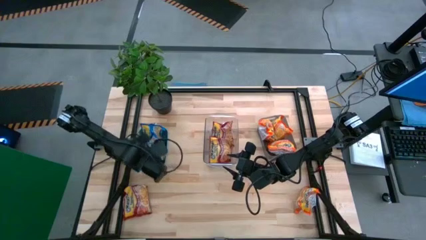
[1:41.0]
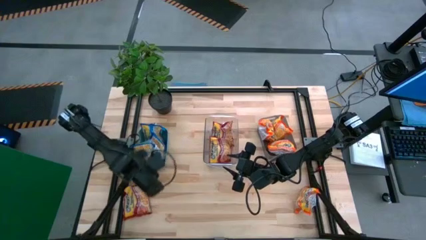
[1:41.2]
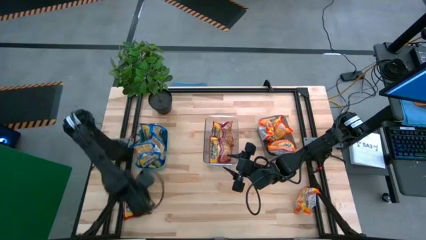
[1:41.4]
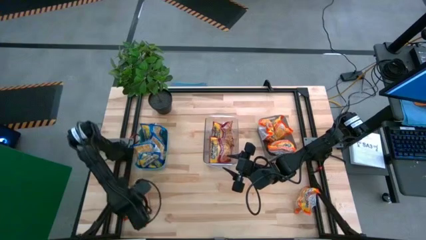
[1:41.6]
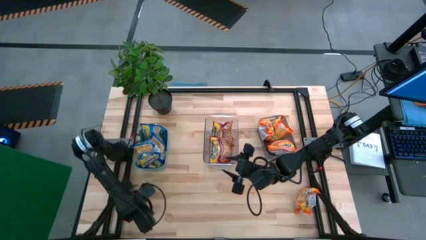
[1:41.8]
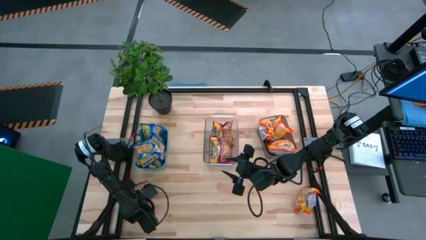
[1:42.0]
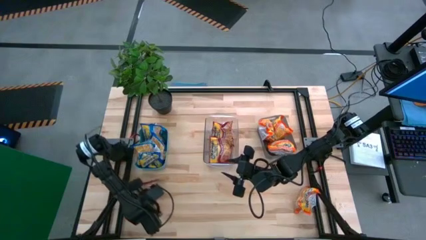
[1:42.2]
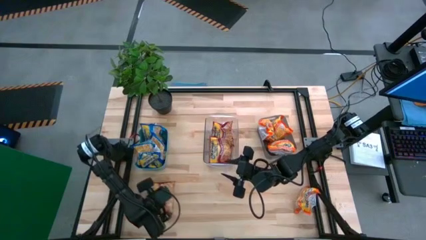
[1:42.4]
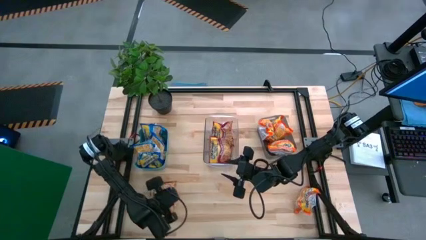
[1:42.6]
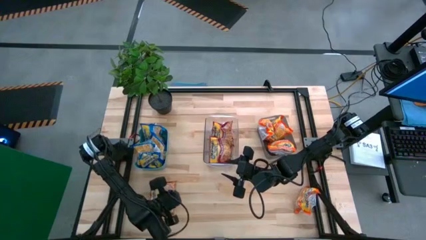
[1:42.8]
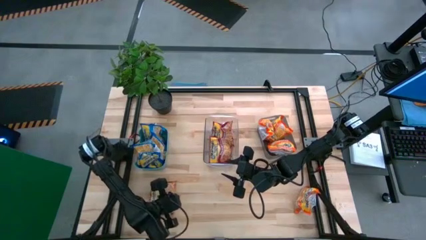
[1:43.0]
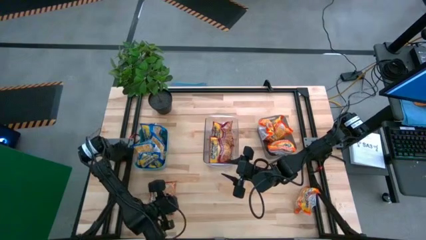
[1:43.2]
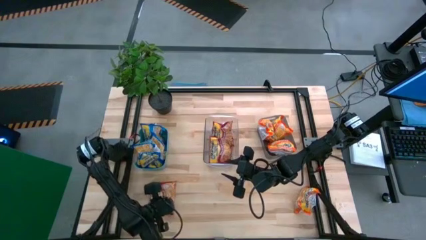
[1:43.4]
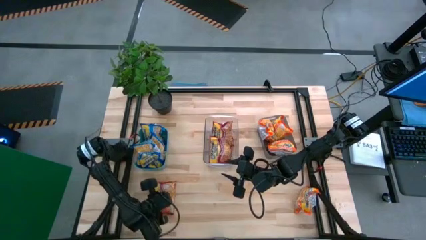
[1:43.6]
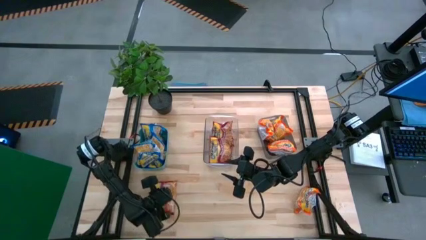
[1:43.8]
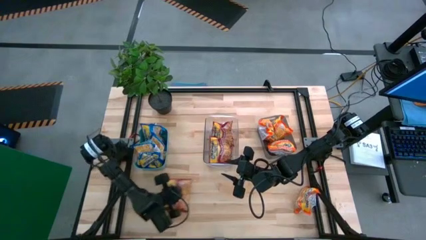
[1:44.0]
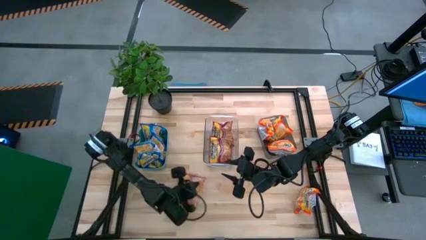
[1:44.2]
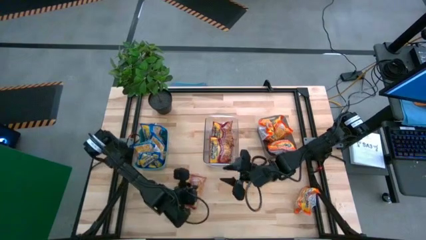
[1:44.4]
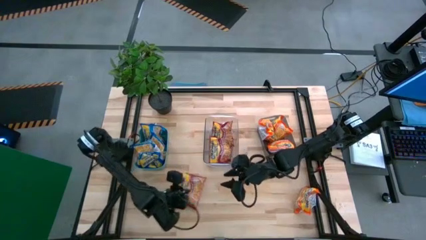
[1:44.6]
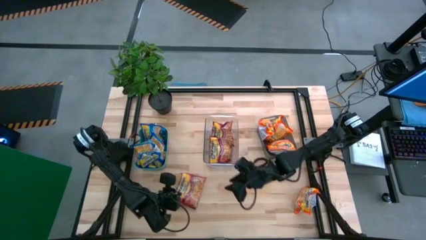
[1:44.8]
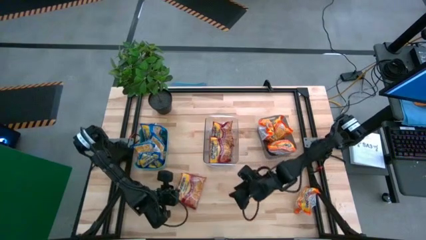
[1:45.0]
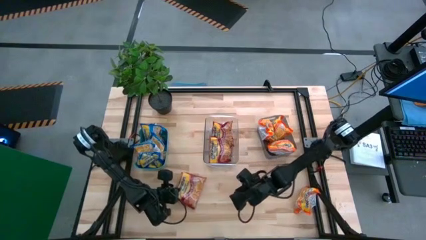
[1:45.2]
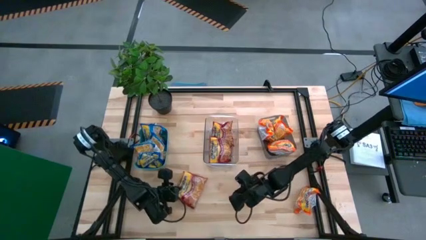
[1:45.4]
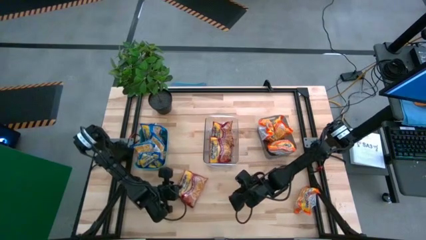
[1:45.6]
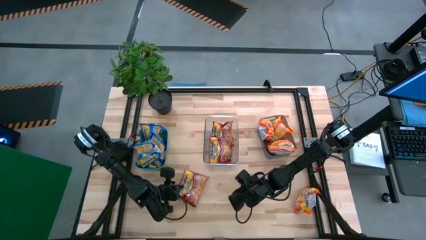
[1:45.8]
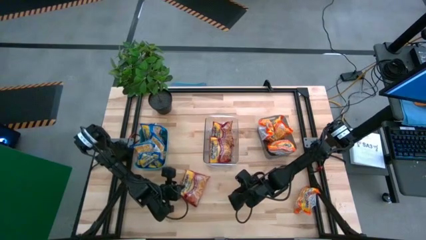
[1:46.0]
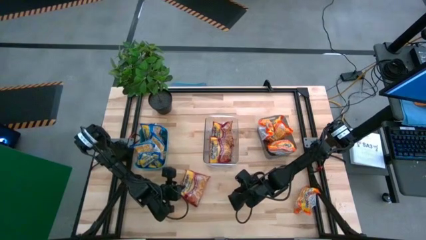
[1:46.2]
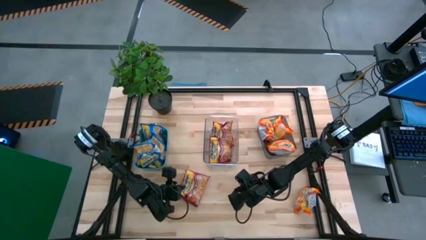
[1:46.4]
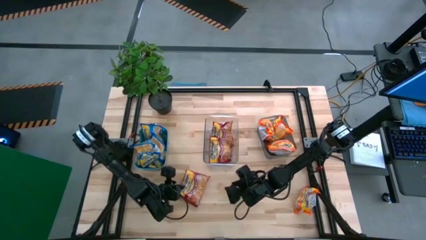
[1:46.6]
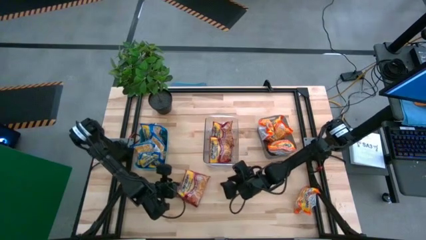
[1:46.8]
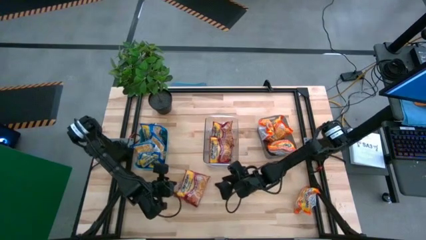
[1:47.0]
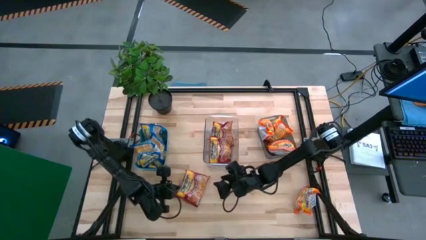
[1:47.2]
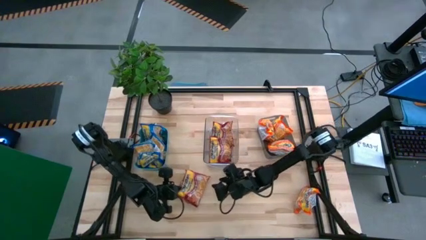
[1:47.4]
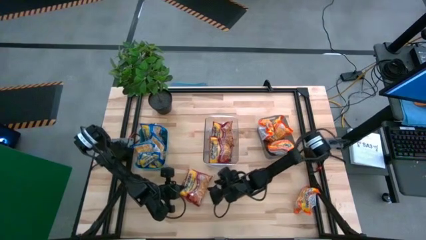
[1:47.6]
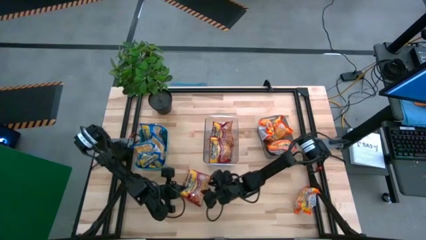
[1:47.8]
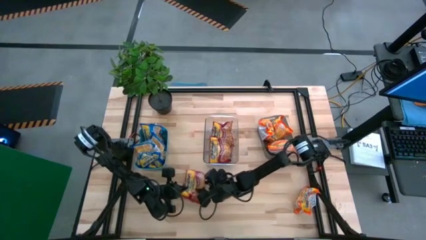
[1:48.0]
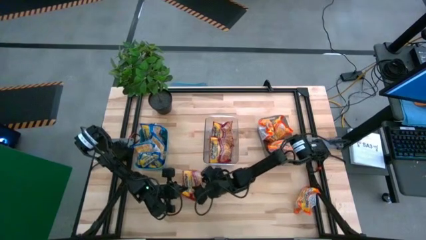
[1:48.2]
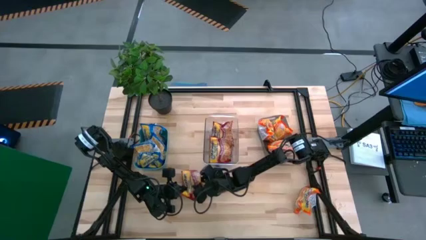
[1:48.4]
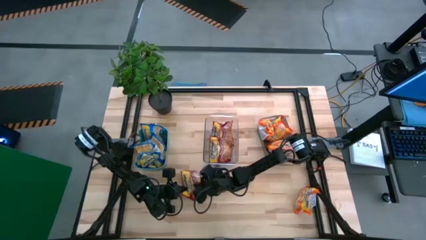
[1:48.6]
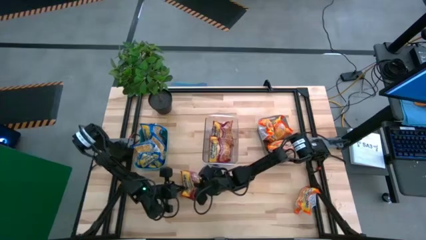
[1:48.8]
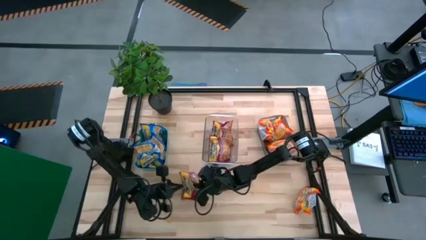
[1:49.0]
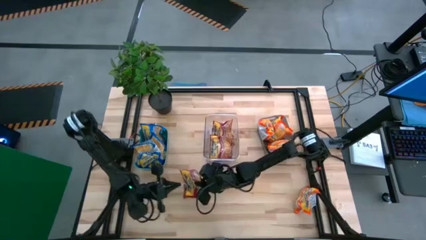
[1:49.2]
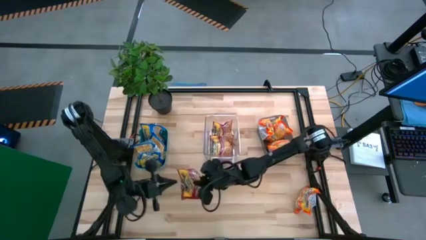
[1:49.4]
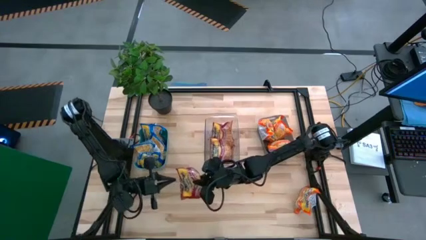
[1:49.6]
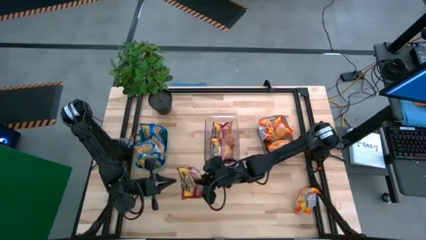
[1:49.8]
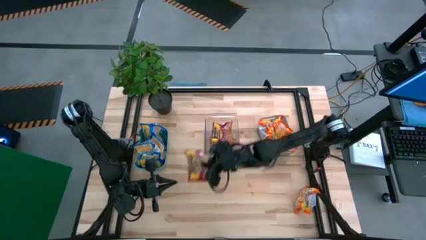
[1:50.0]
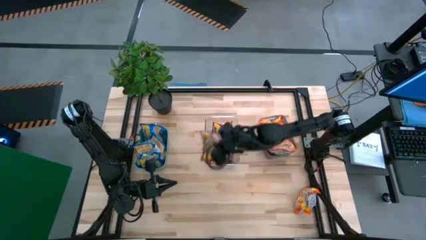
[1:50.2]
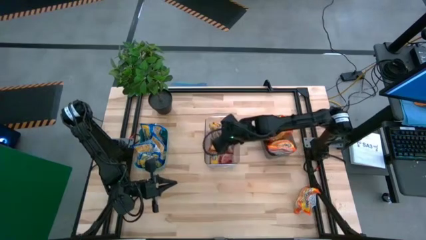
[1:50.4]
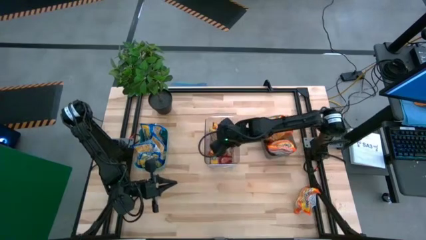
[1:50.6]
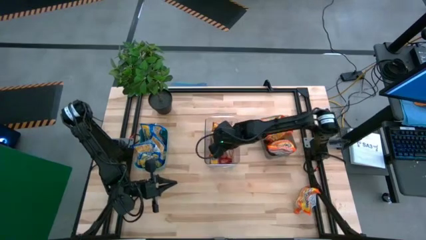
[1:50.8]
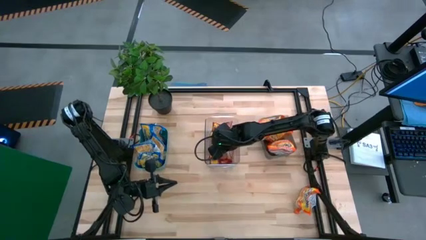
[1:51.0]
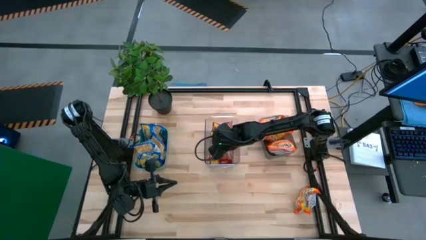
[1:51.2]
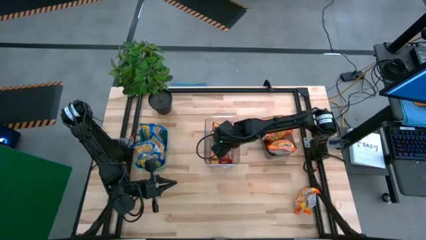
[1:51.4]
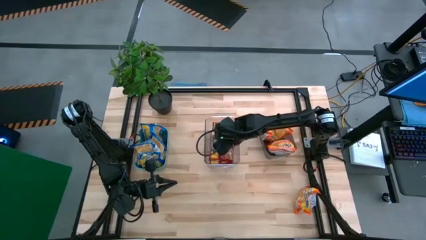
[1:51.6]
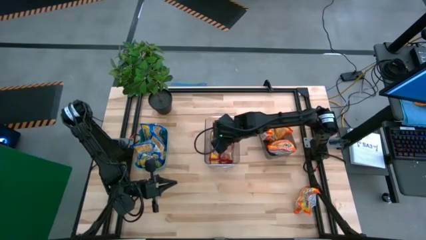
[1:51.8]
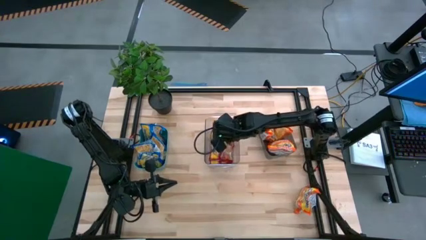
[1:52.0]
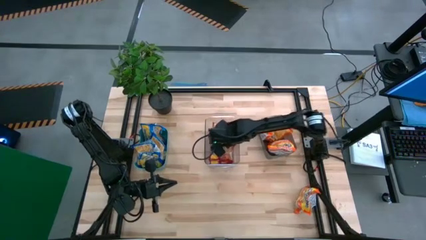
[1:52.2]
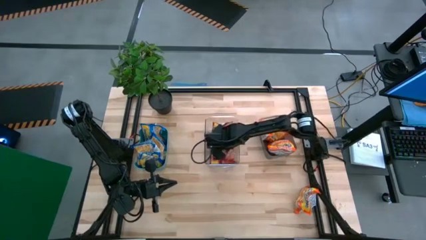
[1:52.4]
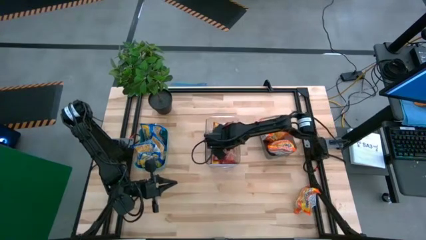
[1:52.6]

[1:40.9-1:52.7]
Task: Sort Maruchan noodles
Put the red noodle pack into the transparent bin

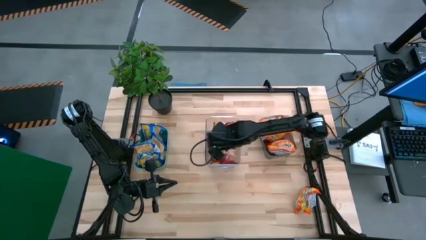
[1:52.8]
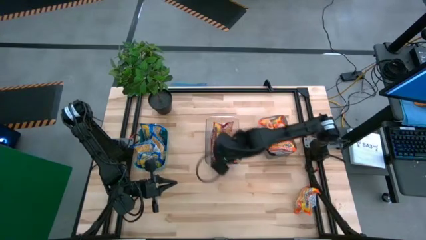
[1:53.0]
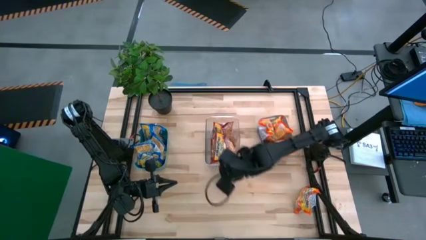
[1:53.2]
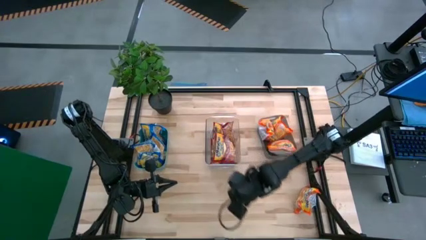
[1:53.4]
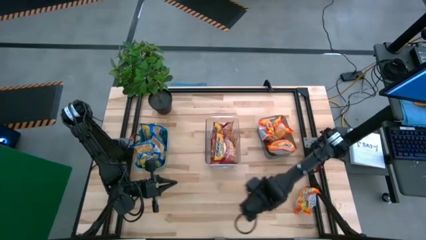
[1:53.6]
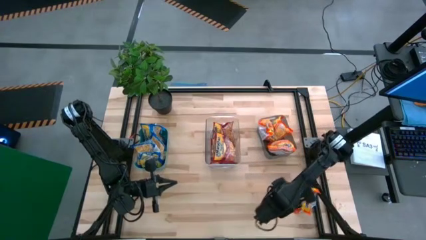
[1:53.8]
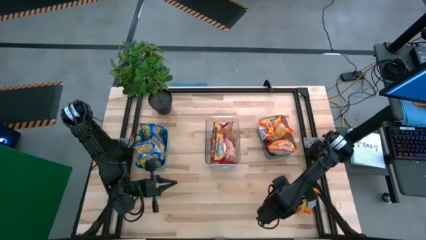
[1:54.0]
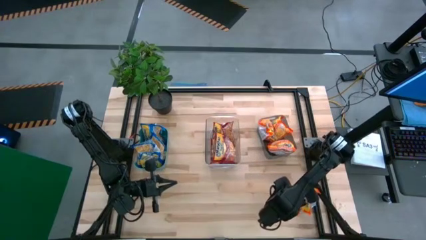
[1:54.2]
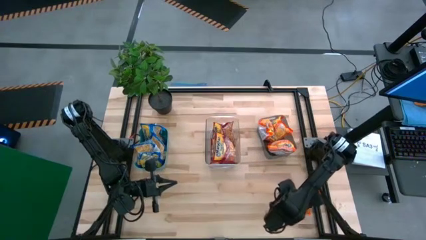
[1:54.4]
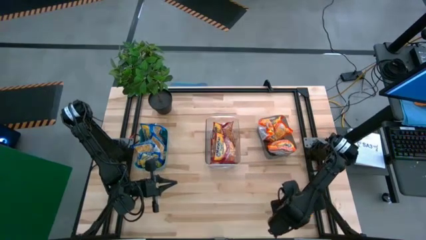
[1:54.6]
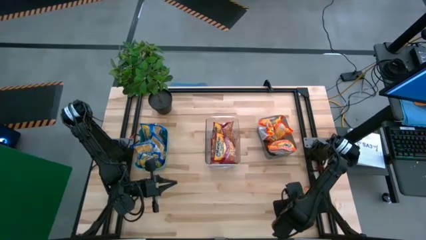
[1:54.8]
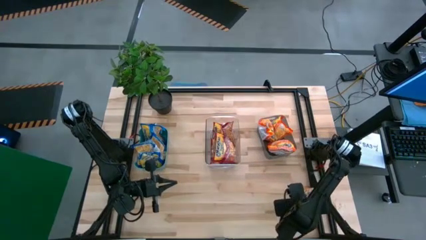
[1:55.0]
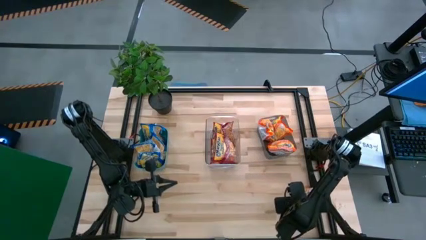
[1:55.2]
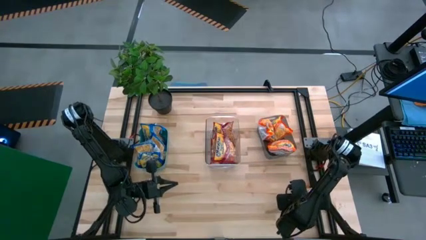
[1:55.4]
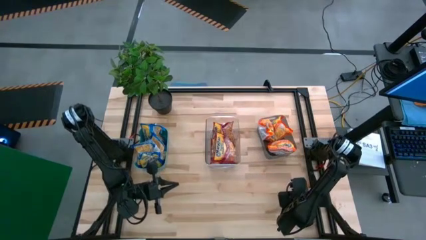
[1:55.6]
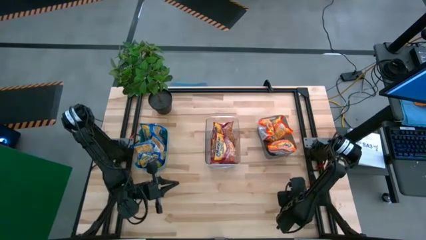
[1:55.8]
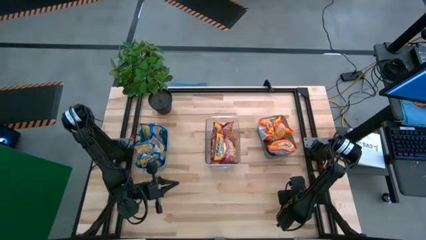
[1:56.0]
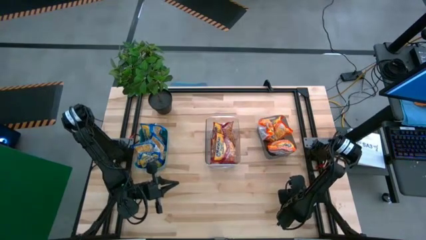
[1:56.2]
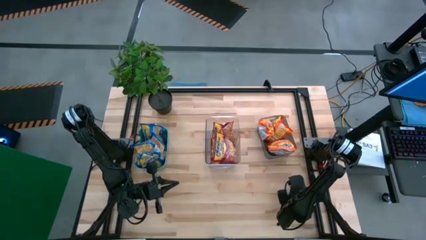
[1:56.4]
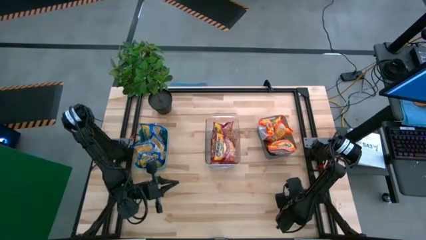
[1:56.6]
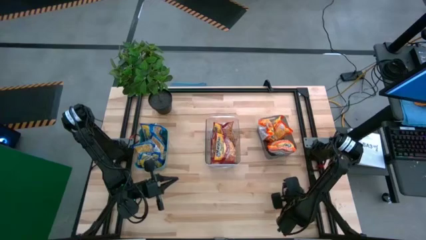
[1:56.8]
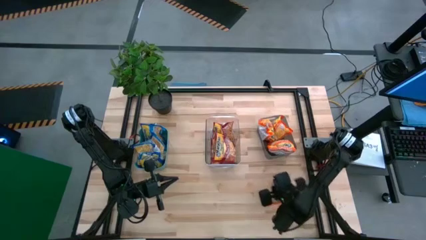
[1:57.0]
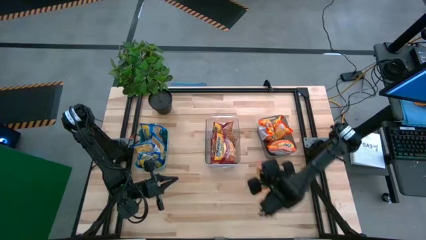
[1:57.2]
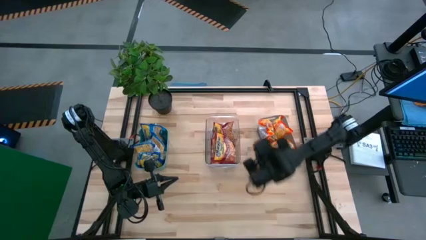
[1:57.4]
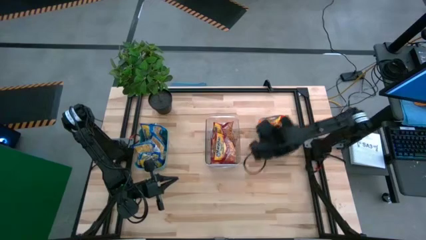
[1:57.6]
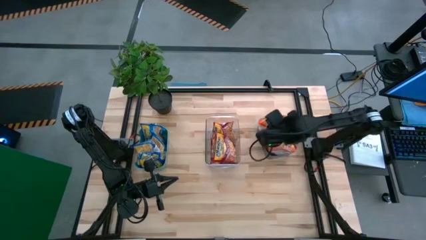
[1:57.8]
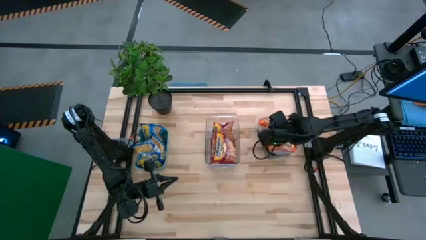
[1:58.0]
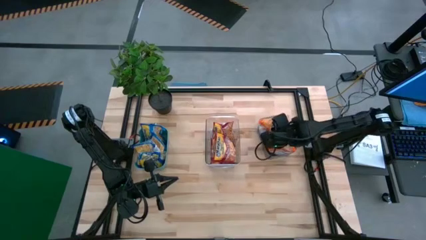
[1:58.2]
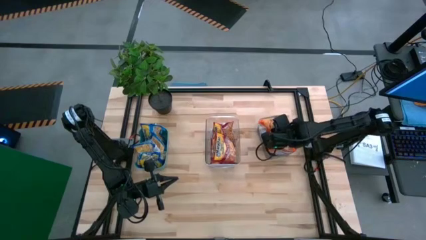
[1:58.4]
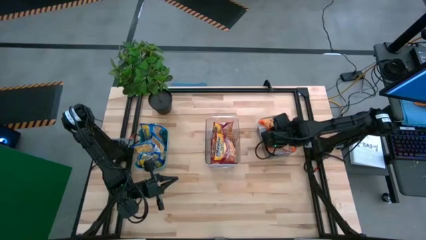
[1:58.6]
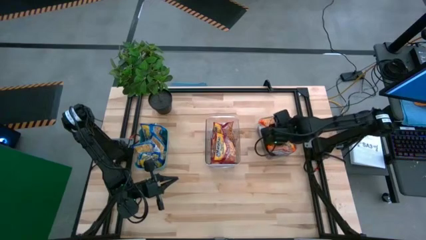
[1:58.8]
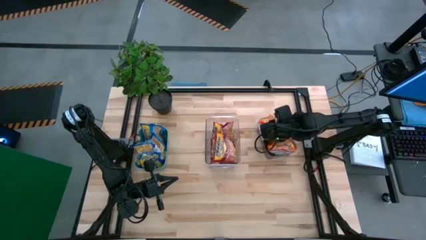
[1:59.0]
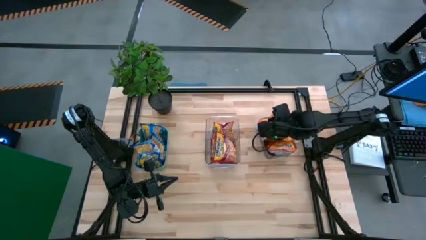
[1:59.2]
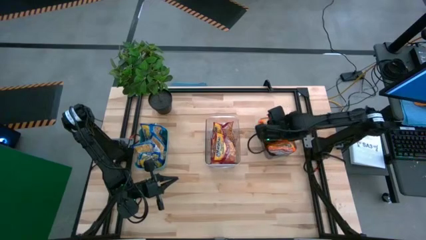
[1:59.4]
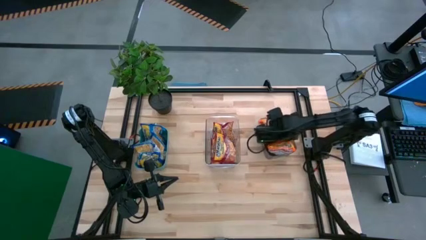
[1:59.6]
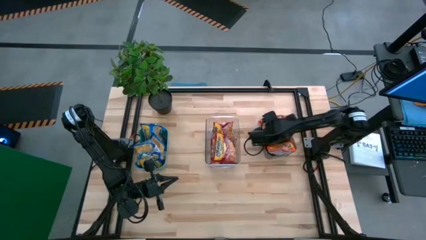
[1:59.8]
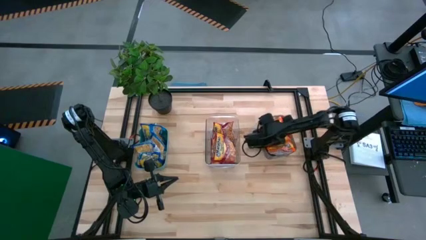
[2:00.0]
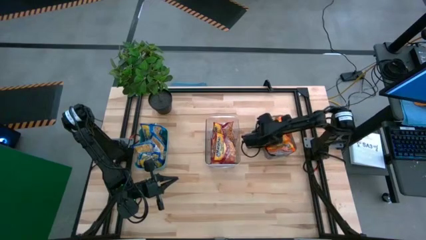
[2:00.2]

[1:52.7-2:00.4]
Put the orange noodle pack into the black bin
